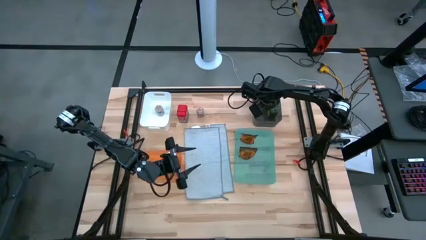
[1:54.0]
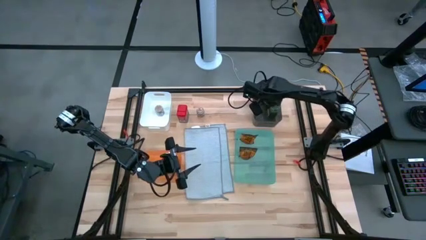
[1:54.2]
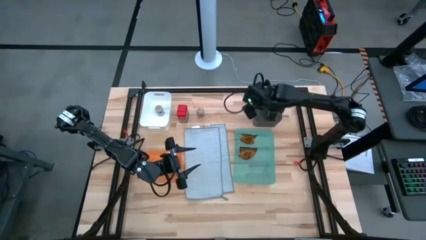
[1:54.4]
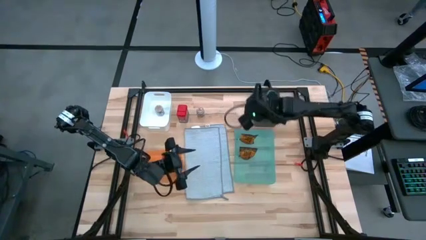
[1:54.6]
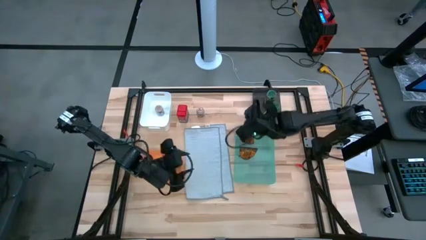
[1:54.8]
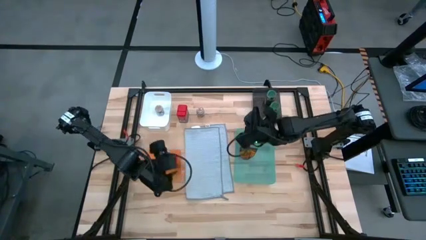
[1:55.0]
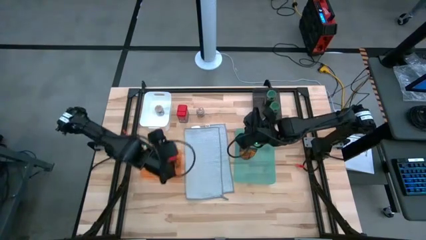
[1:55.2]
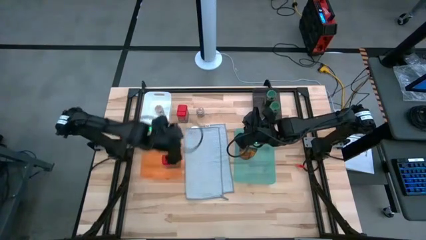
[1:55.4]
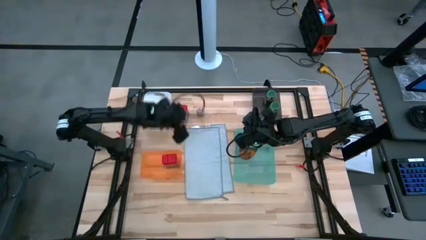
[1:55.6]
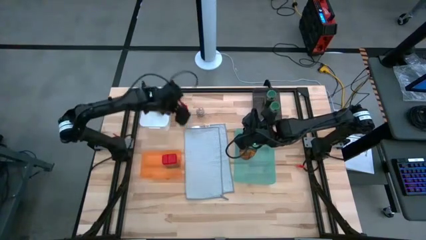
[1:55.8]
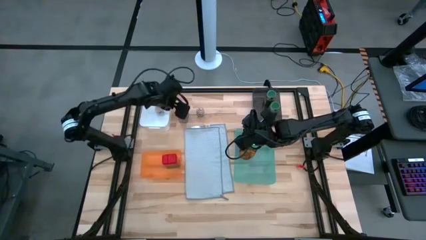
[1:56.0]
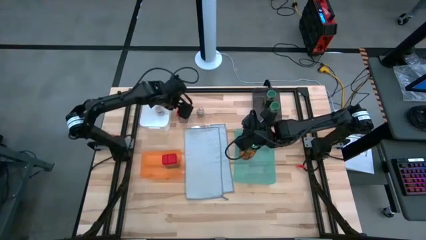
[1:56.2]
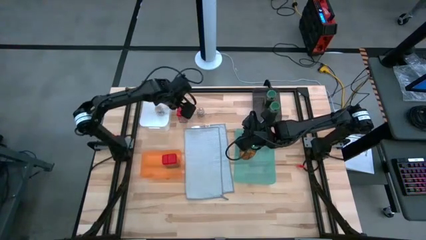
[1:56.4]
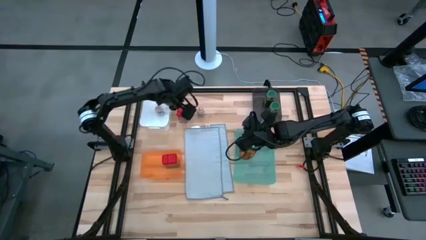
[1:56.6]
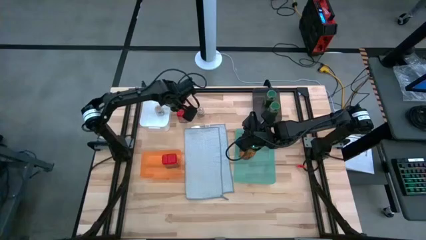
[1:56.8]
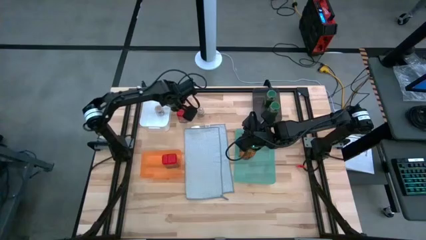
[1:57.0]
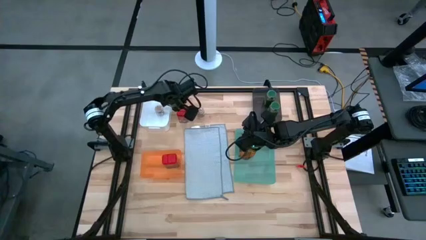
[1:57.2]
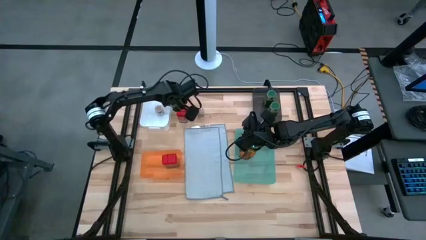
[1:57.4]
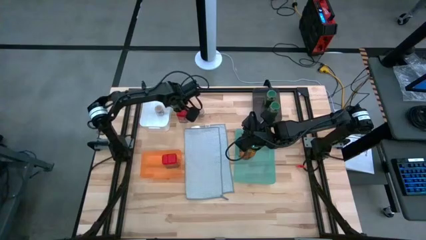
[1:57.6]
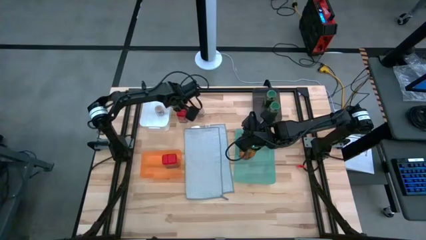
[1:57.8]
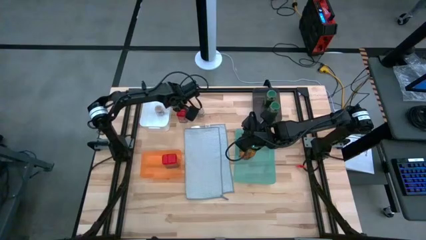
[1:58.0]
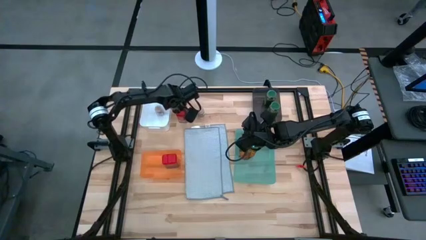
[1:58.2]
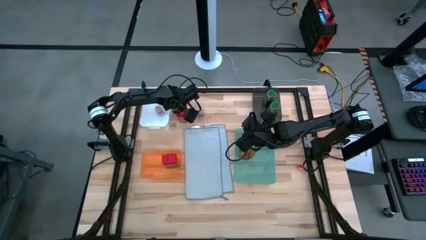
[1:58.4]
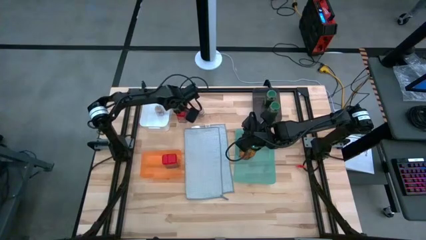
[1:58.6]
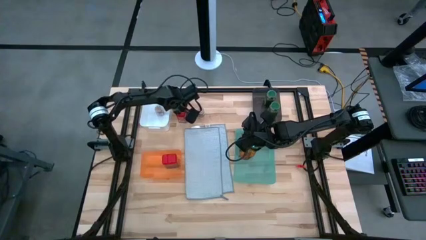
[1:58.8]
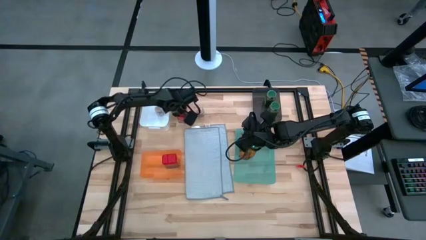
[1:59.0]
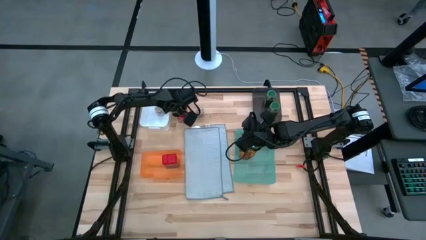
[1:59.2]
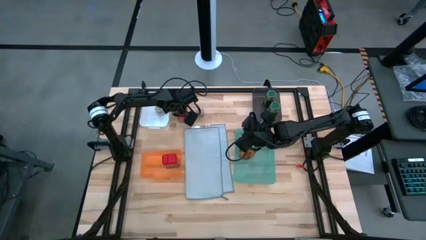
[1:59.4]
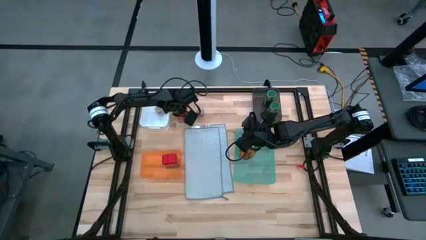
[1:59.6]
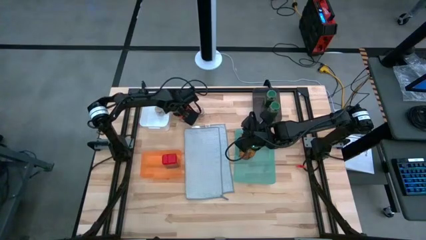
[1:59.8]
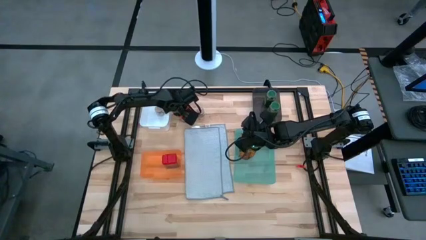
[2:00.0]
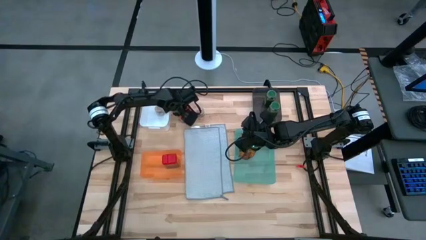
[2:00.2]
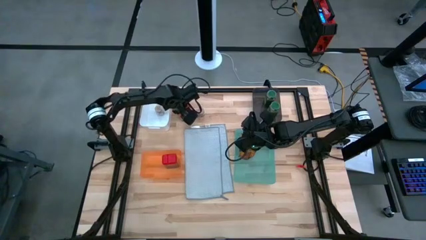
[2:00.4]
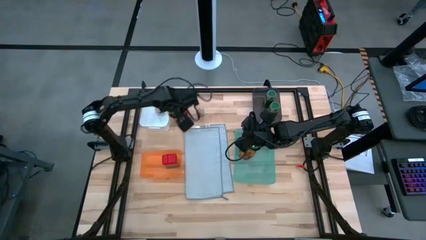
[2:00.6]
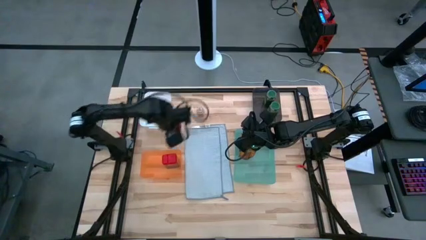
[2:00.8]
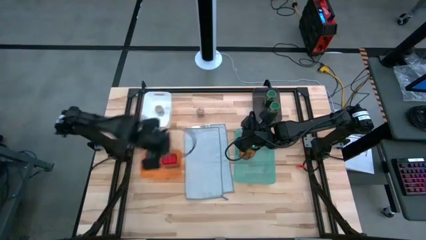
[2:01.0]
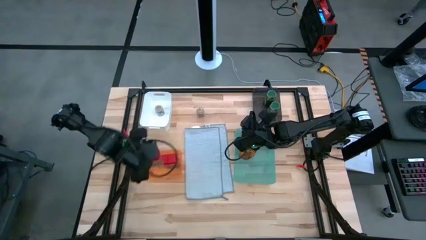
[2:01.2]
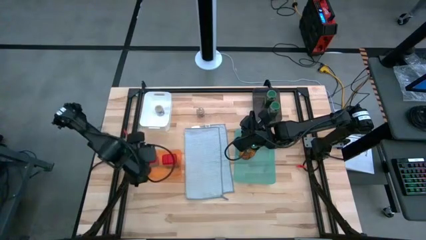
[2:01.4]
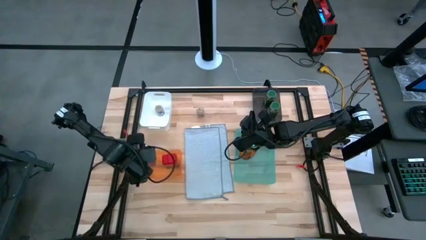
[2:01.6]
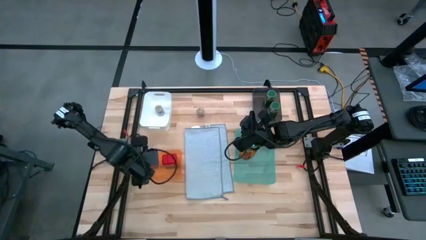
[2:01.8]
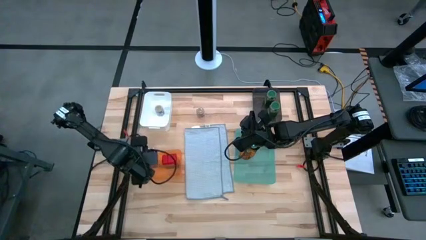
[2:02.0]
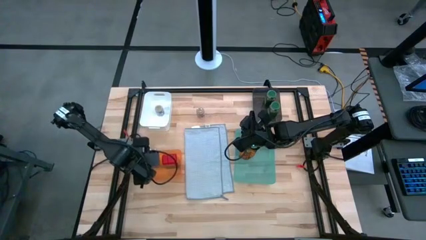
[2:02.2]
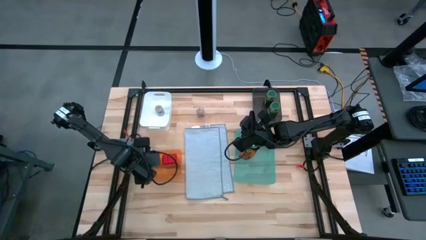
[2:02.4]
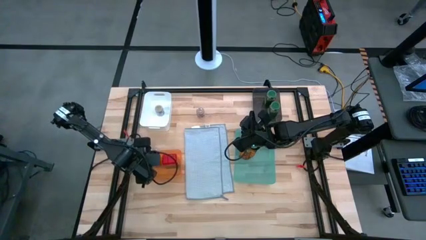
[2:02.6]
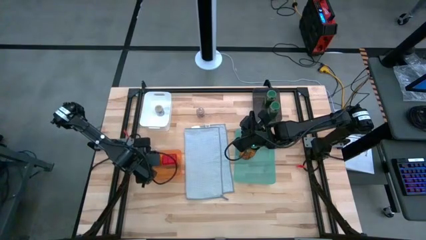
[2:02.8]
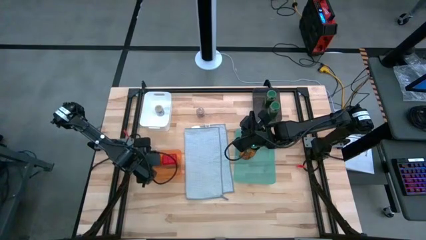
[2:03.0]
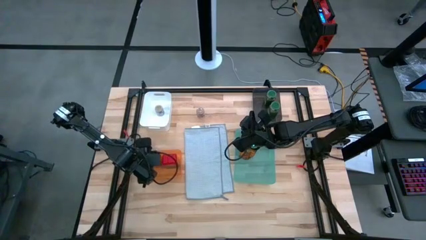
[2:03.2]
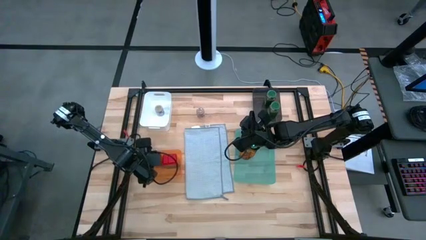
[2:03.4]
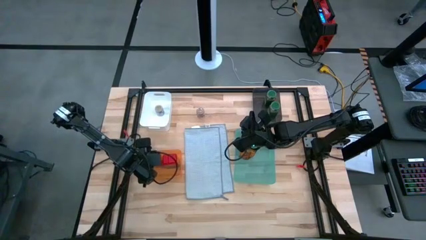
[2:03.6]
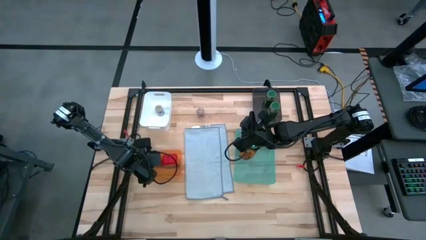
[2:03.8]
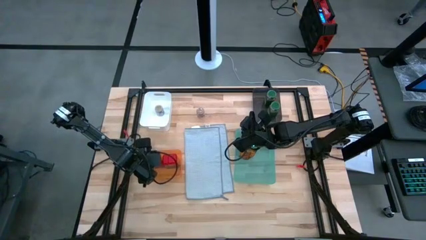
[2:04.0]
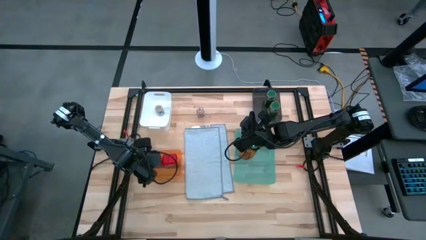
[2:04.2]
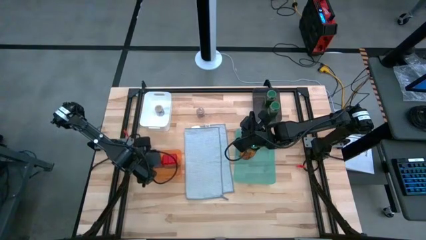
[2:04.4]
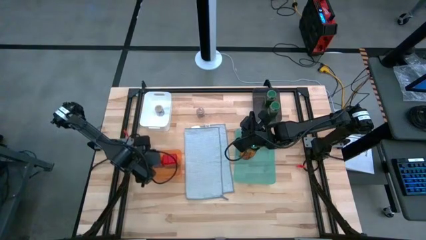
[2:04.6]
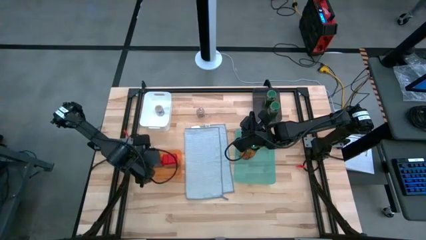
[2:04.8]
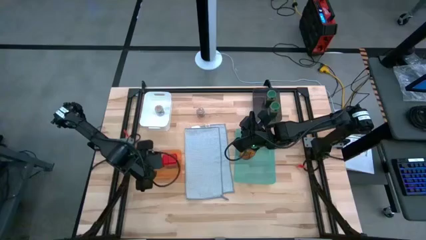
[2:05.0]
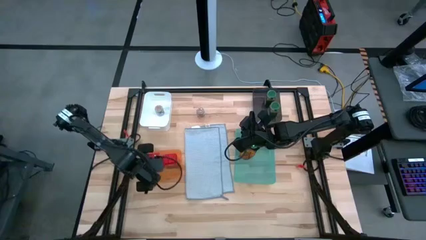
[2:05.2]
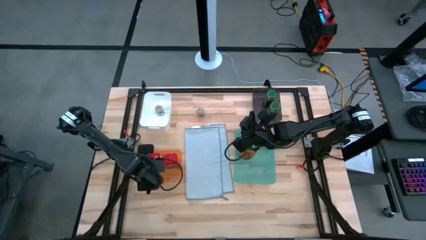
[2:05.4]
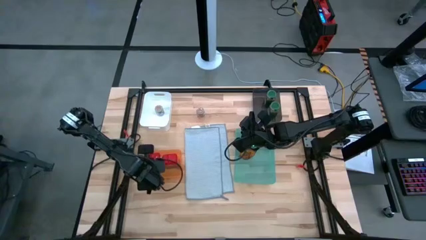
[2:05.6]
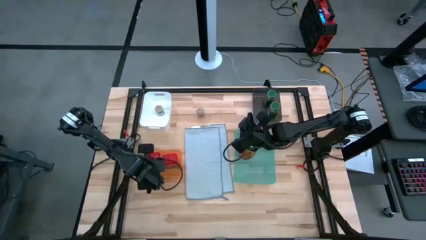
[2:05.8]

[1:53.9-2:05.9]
Task: Sort spices by type
Put the red seasoning can into the orange bin

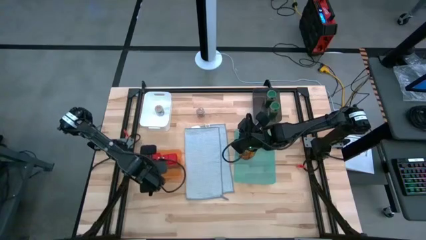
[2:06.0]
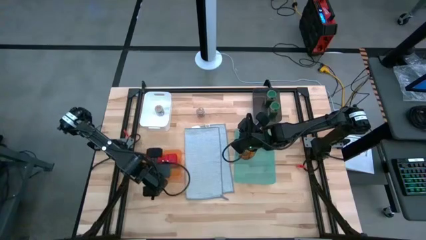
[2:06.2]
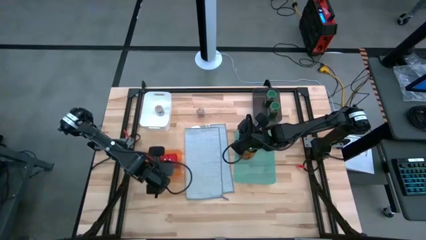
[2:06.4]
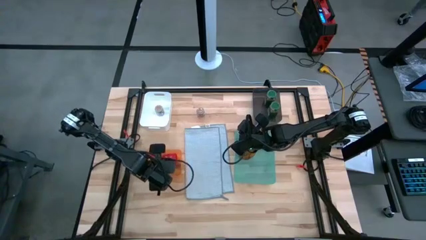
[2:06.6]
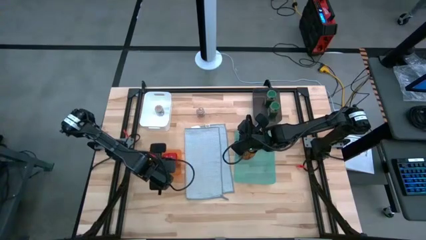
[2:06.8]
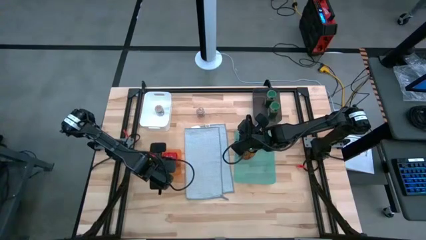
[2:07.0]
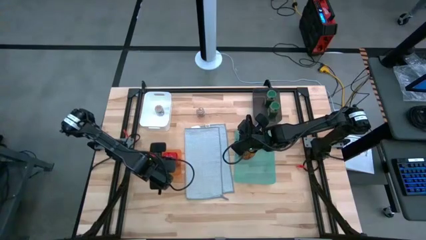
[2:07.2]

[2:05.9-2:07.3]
Adjust the right red seasoning can
